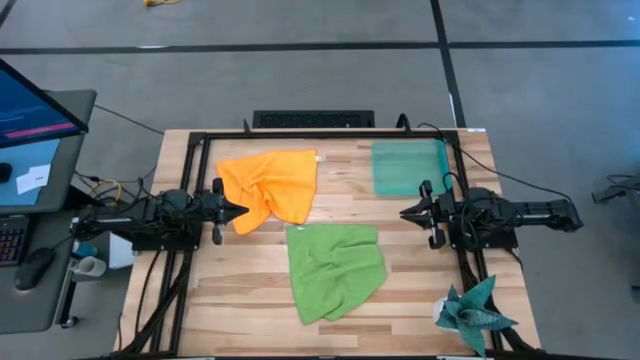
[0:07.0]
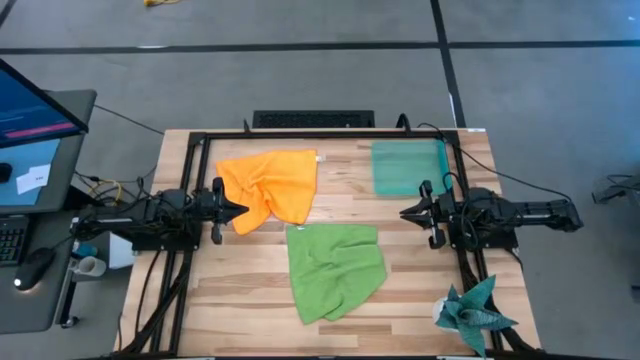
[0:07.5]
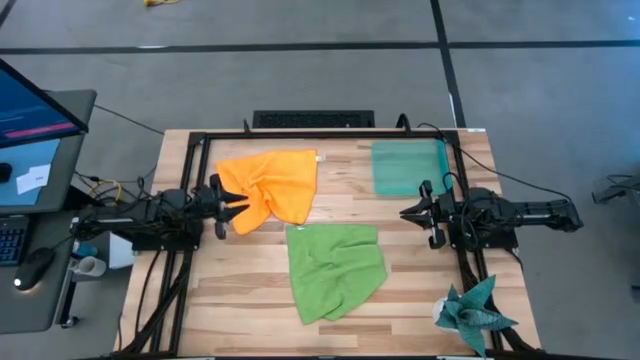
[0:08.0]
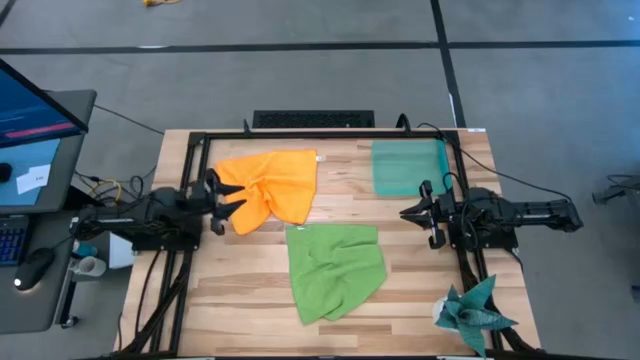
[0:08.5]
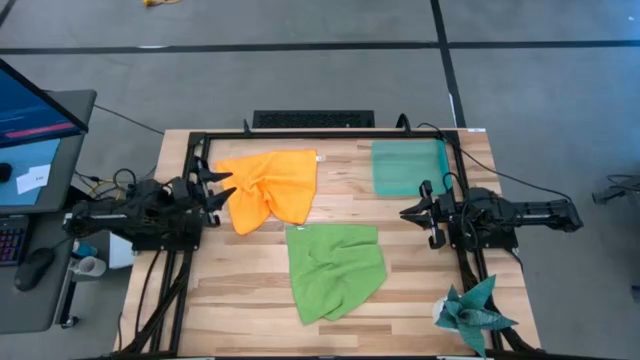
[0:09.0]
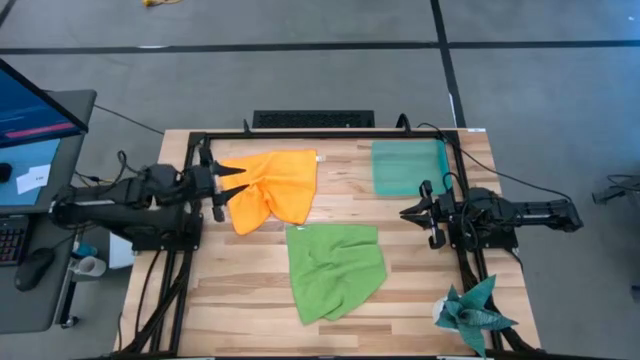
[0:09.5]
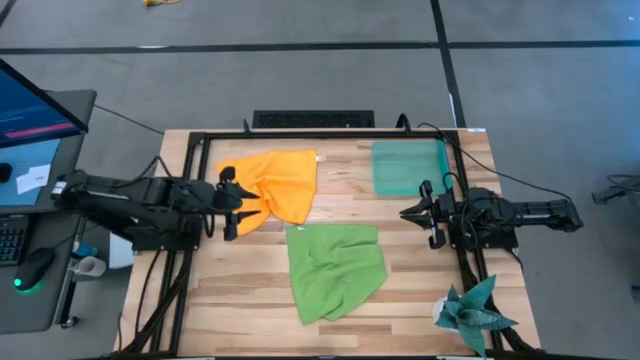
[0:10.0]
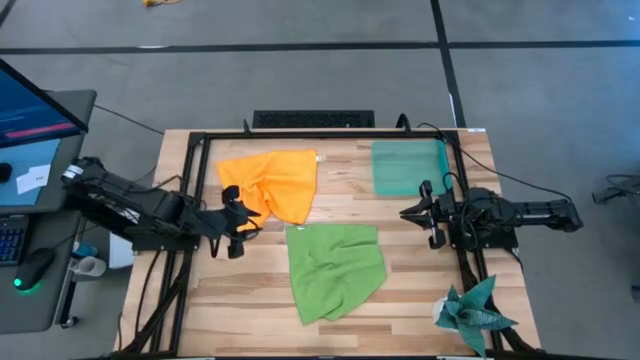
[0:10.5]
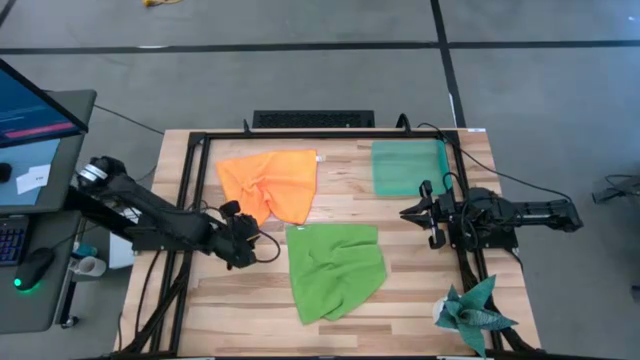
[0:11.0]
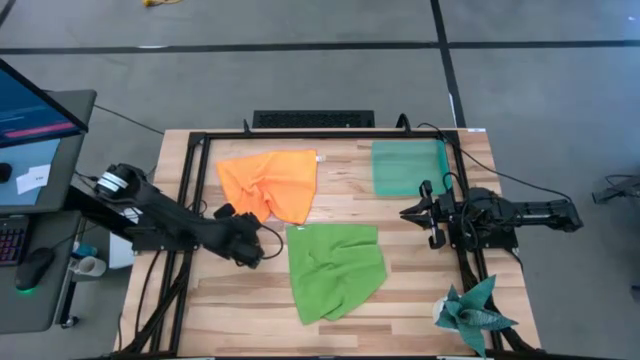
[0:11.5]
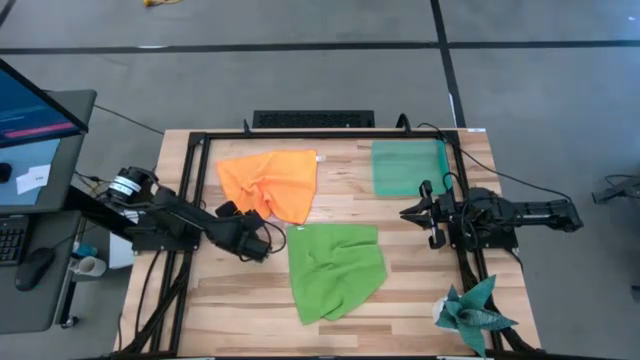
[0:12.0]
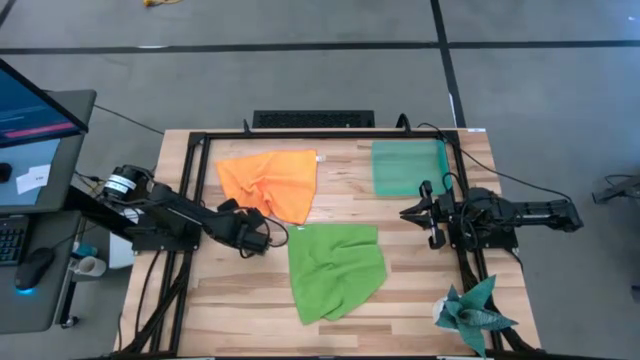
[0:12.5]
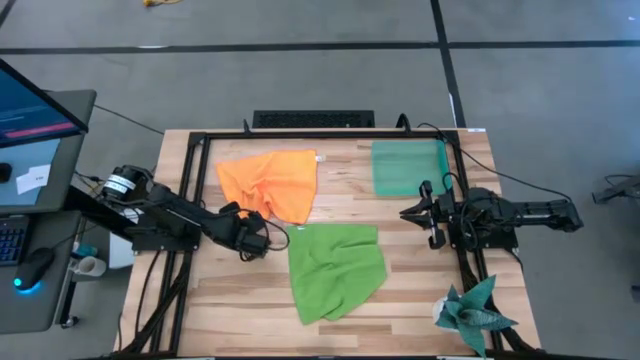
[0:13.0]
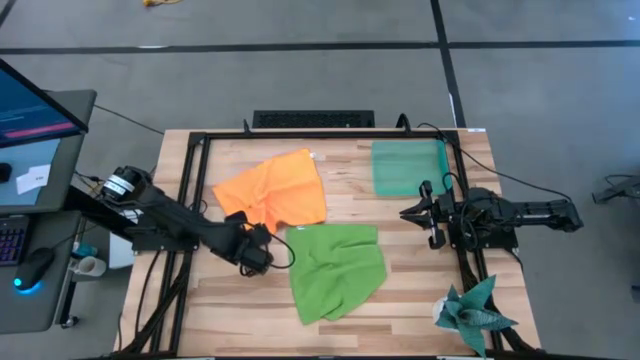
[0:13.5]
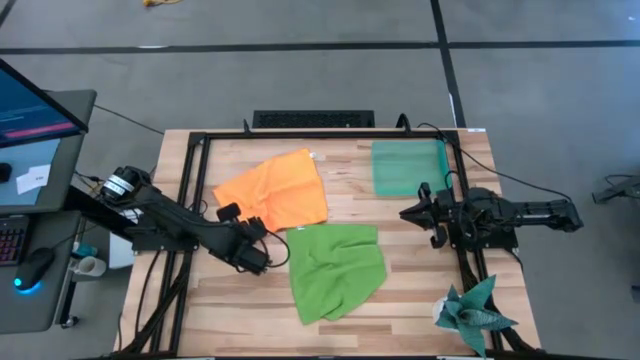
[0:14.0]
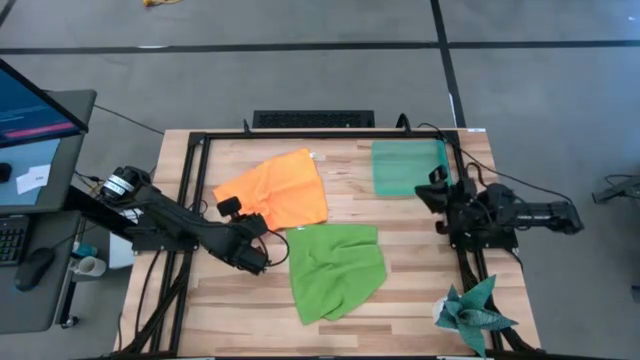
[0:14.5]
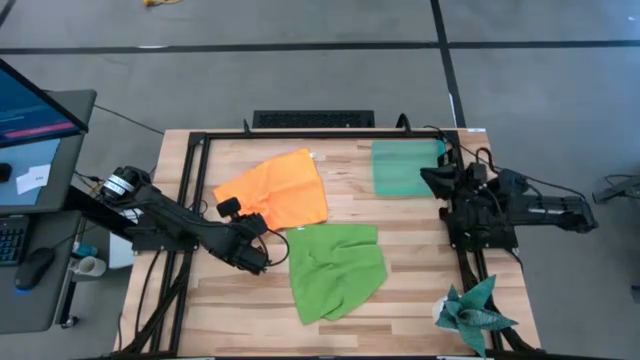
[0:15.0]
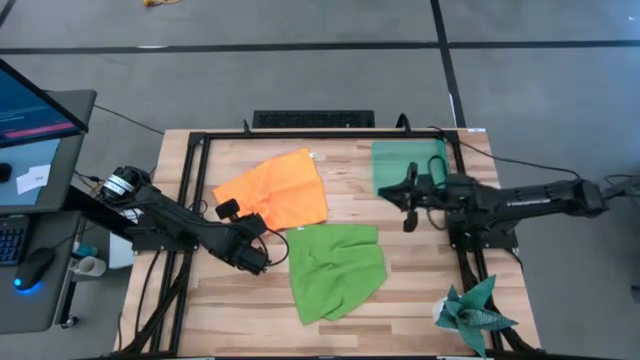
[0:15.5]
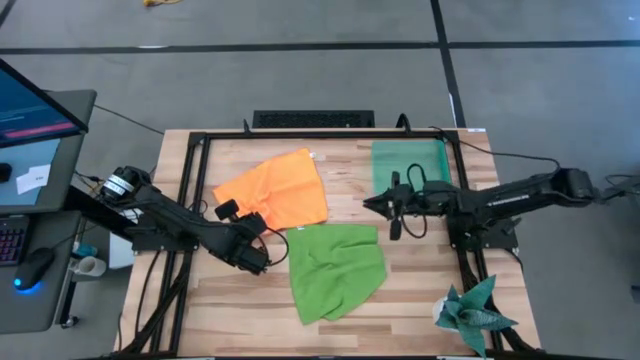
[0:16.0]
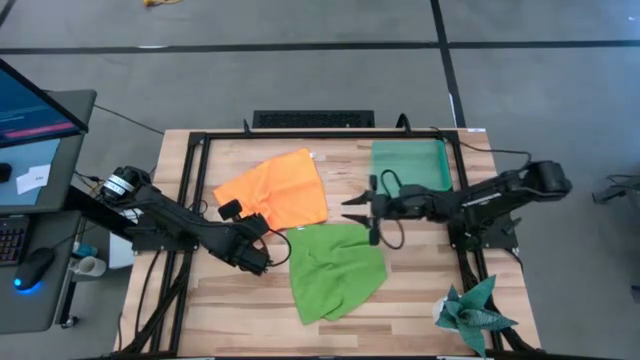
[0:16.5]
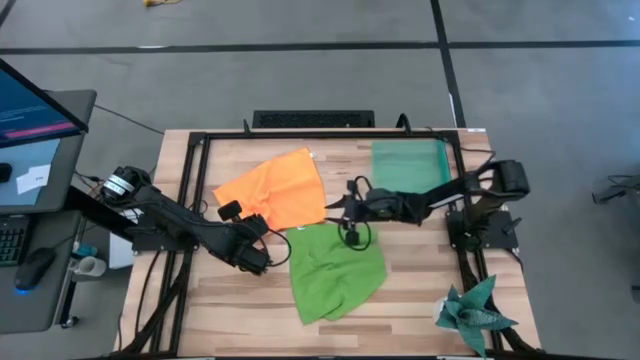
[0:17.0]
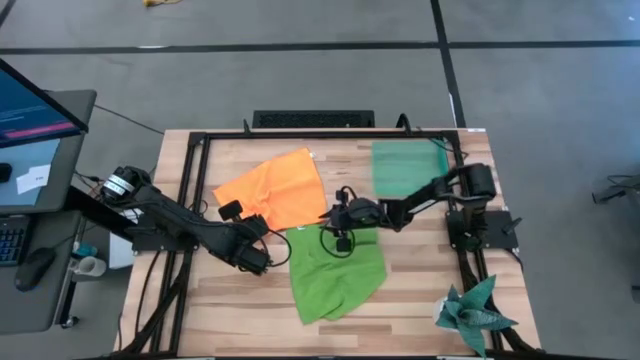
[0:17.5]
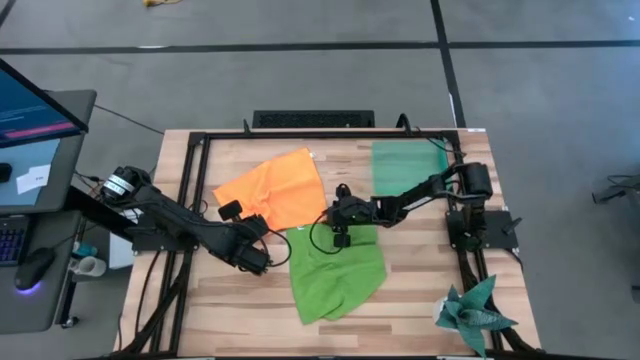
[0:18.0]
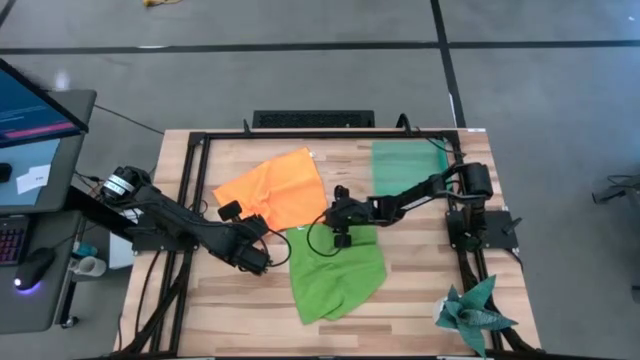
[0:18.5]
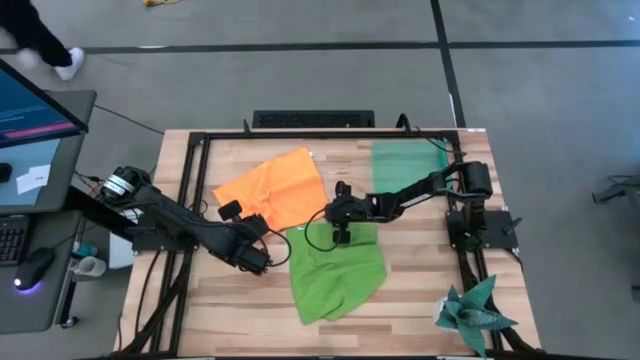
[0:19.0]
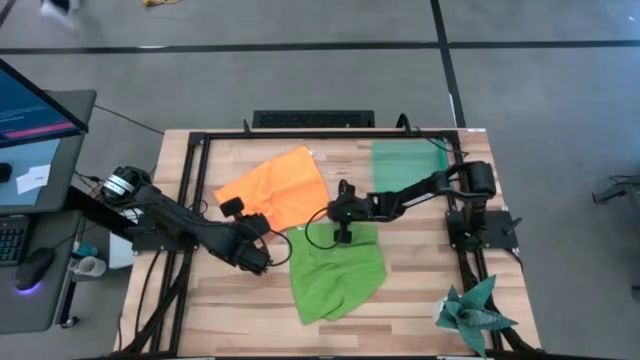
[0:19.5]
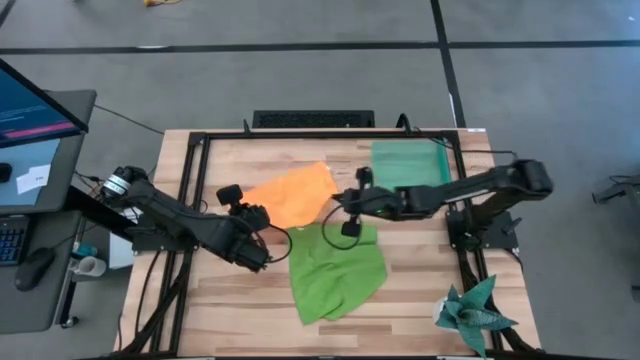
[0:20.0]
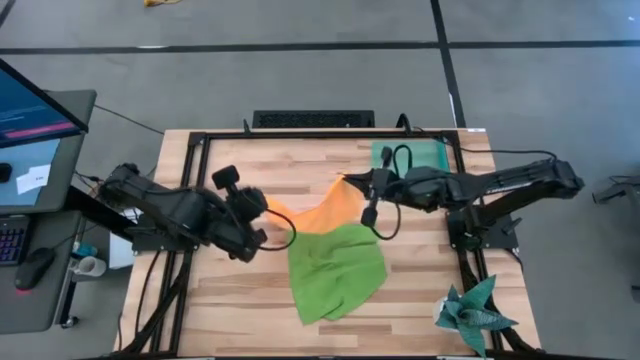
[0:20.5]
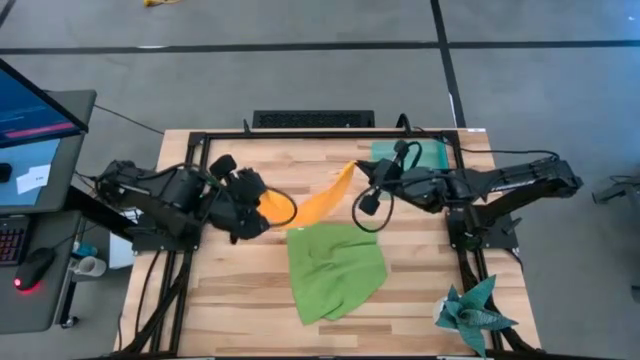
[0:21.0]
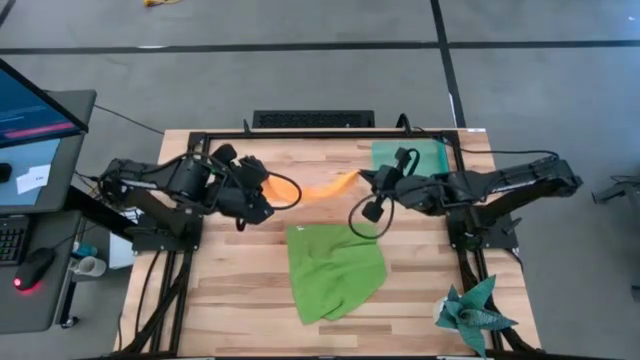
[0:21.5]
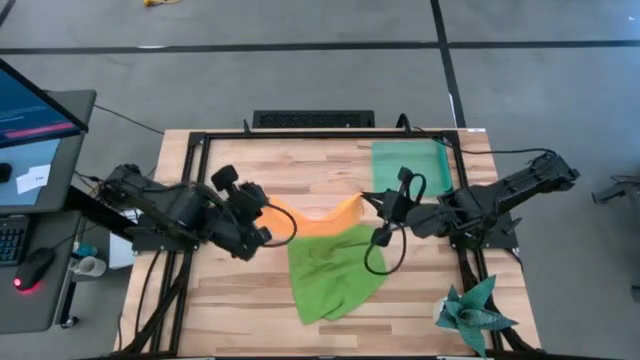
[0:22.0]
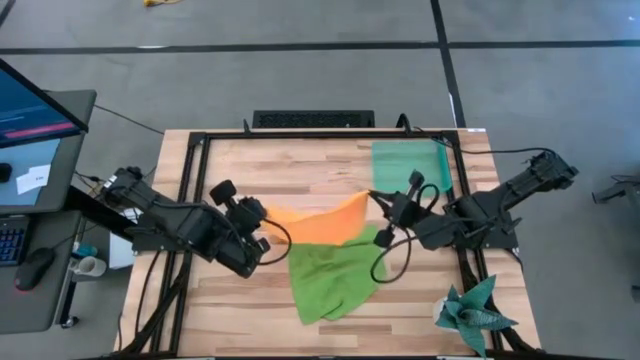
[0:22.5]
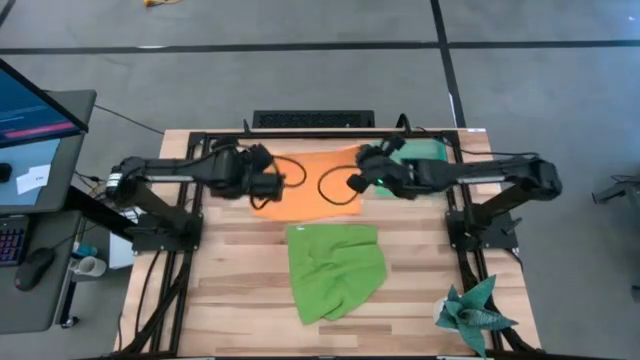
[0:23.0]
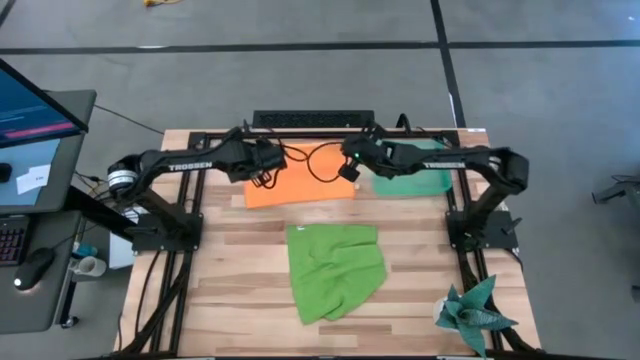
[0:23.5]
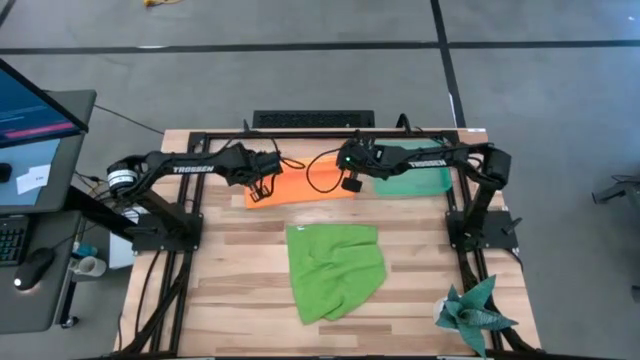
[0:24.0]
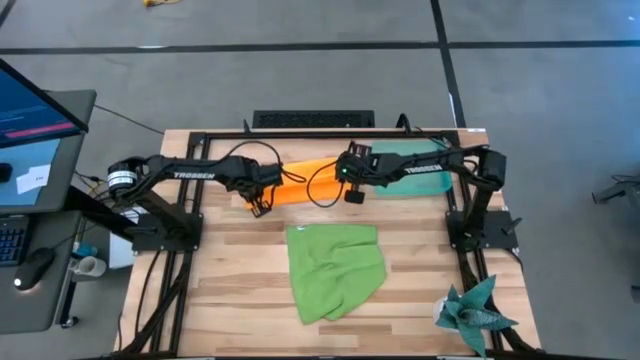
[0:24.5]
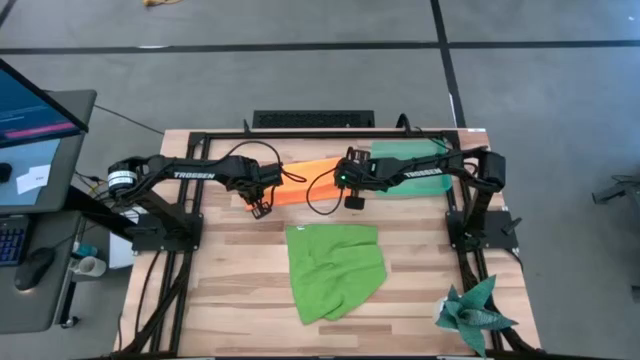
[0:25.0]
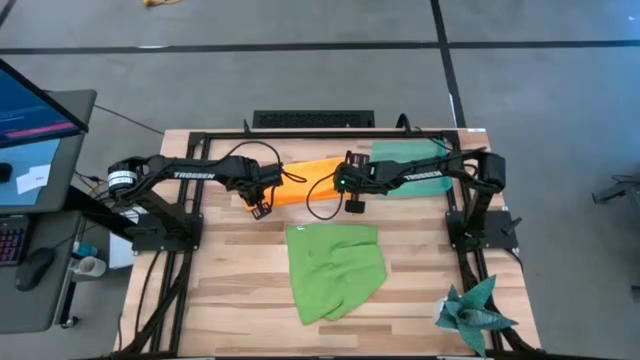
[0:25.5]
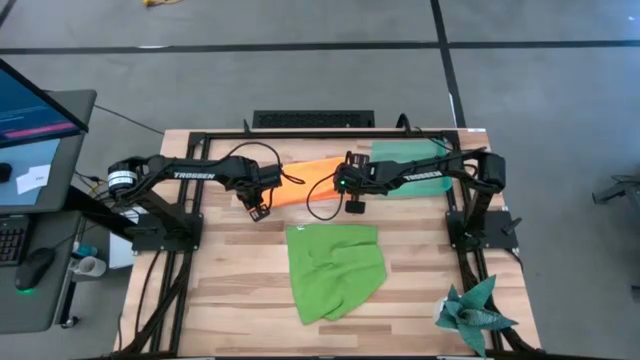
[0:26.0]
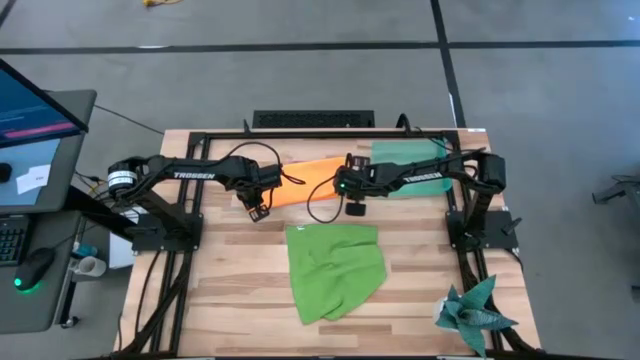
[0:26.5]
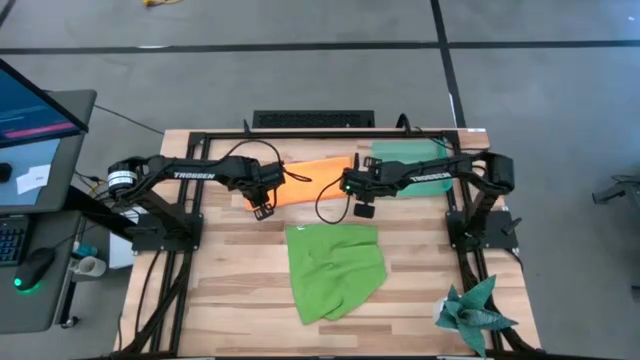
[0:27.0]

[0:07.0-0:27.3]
Task: Roll microfiber towels into tight, uniform cylinder then place into a basket
Fold the orange towel
